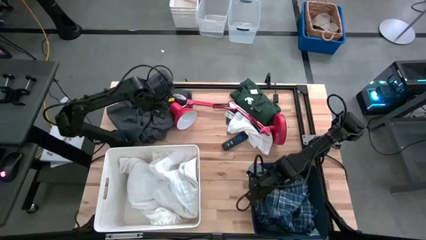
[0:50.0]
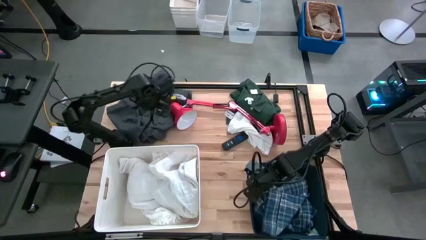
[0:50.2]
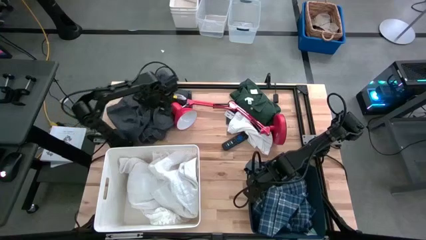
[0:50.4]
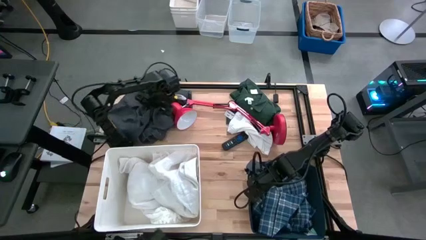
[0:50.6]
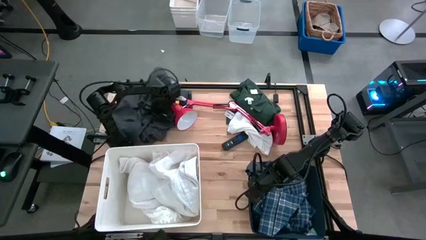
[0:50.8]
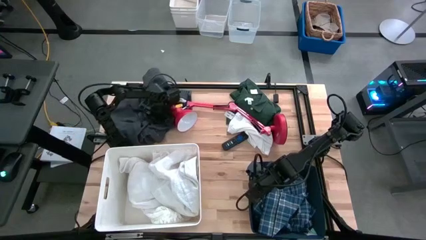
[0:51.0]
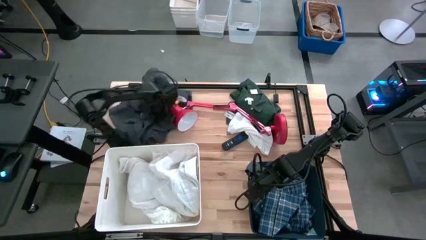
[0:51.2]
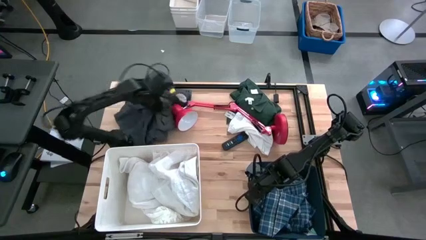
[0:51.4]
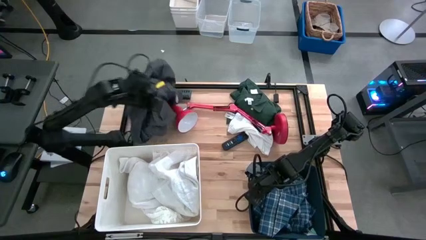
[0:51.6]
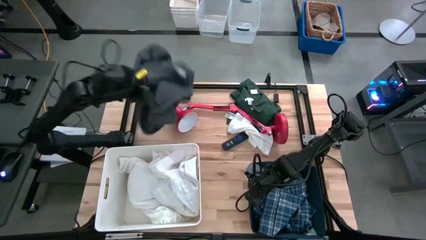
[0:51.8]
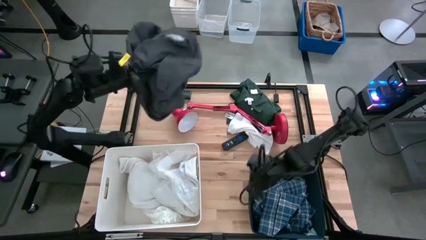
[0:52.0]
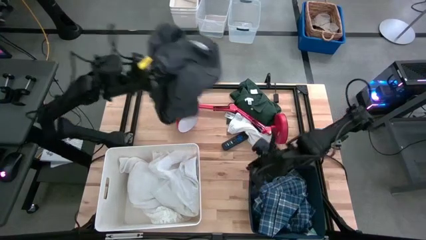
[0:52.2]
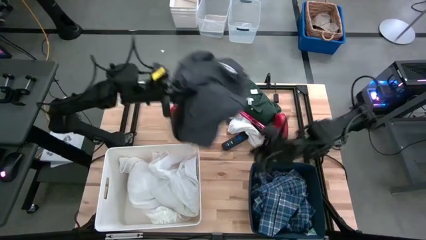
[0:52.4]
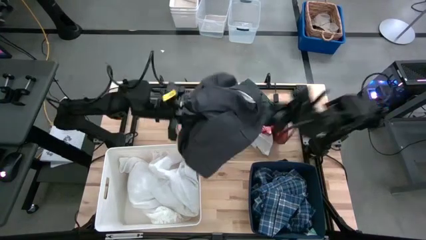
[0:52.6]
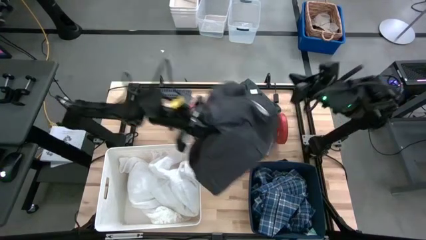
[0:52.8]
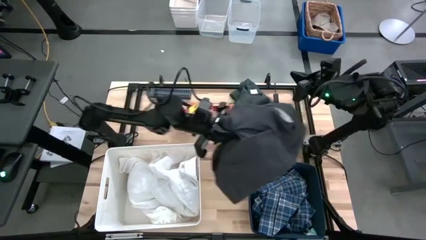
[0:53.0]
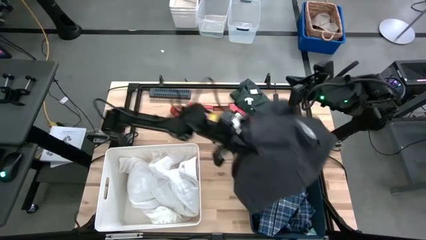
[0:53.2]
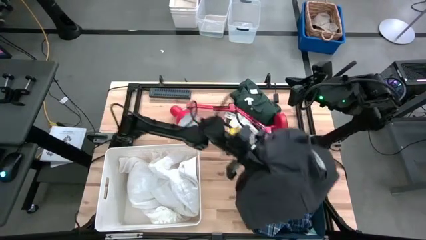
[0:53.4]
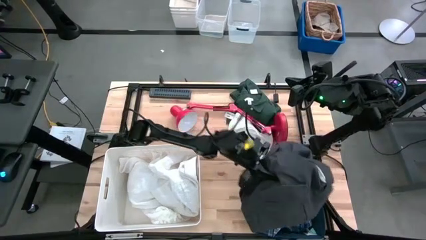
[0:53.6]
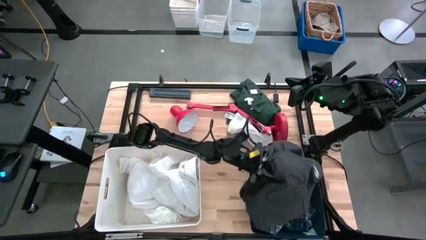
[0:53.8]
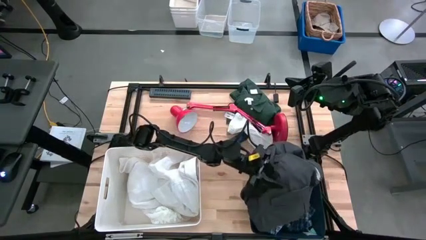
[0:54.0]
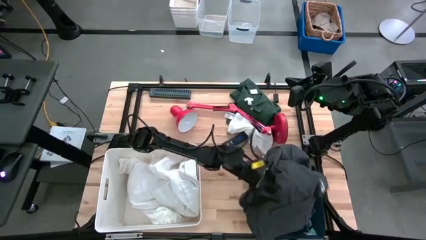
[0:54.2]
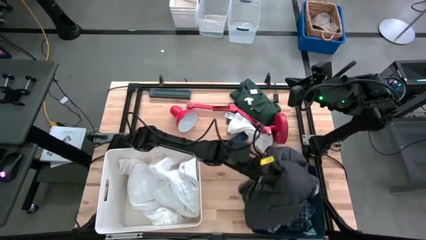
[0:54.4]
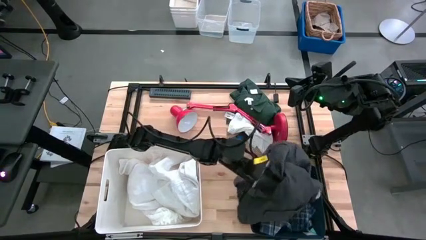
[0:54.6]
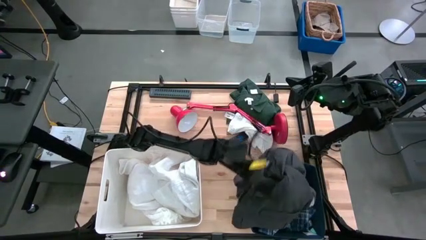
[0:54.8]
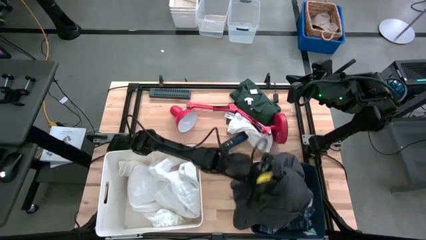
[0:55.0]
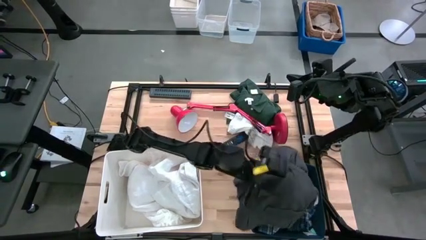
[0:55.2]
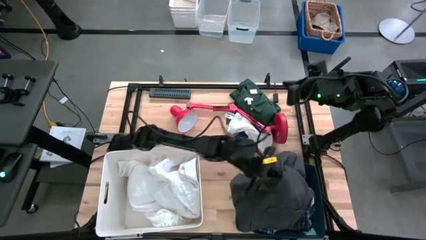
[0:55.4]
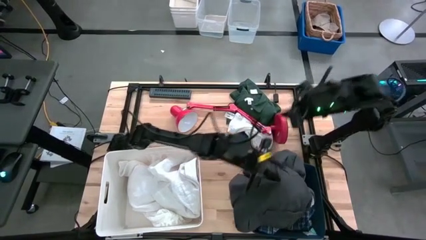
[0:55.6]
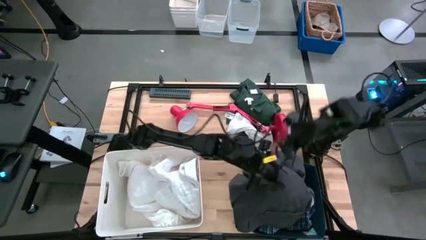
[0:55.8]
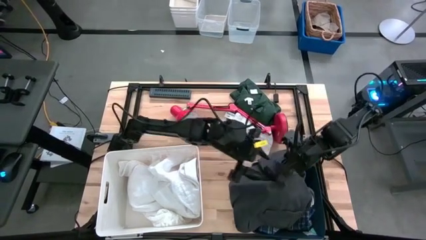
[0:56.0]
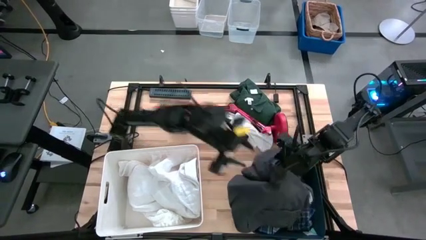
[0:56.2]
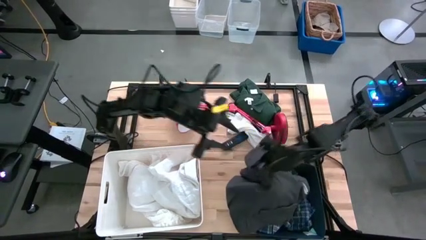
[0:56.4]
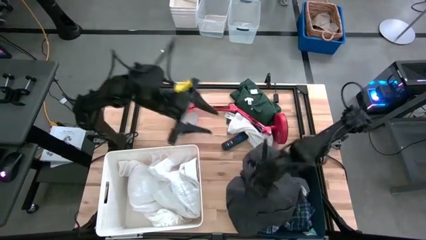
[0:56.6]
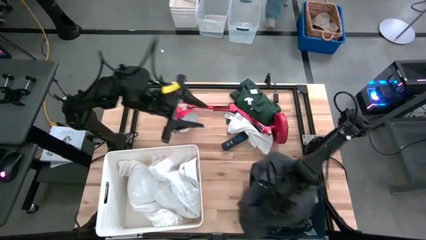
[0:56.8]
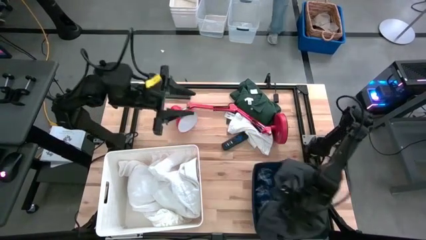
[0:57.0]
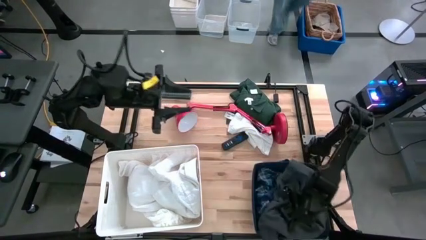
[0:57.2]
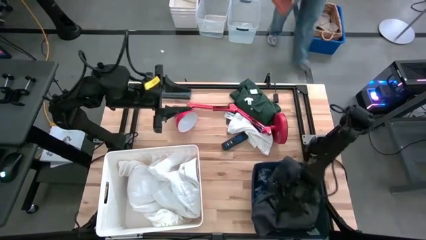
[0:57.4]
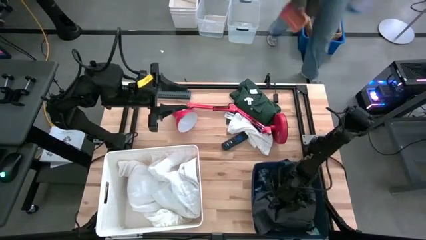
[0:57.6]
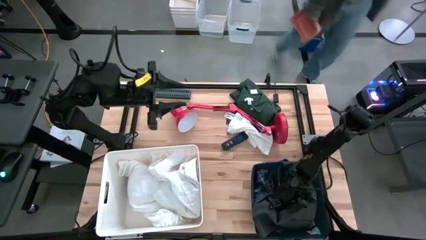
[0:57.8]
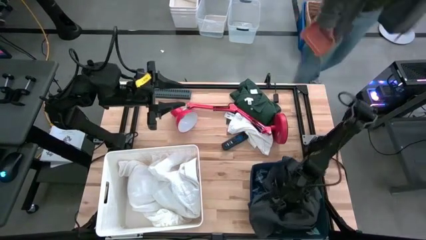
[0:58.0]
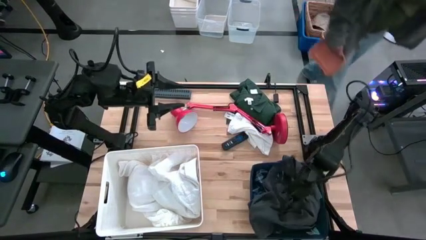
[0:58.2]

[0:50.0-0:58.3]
Task: Sort clothes
Put the black shorts into the blue bin

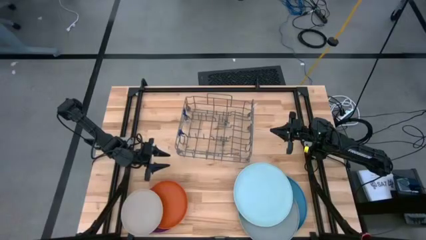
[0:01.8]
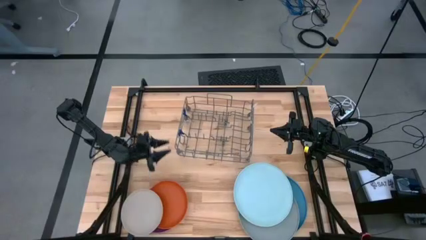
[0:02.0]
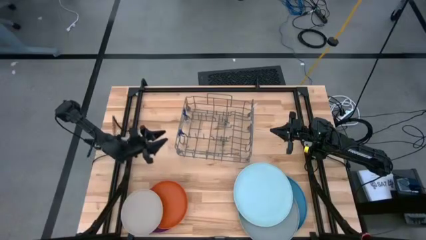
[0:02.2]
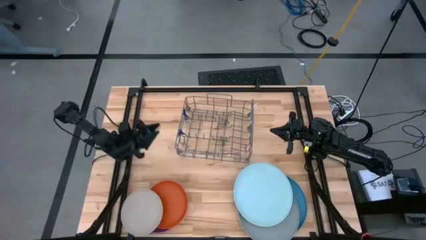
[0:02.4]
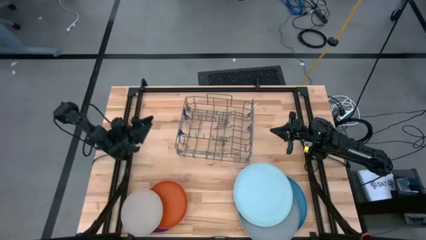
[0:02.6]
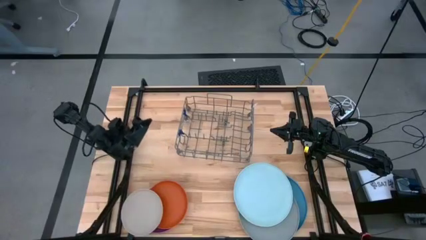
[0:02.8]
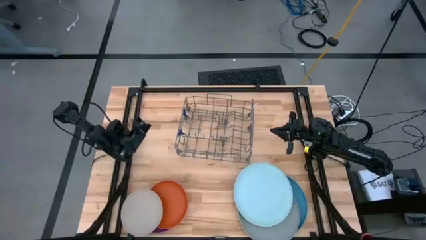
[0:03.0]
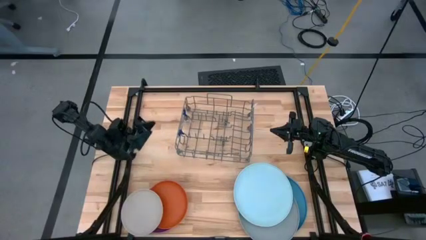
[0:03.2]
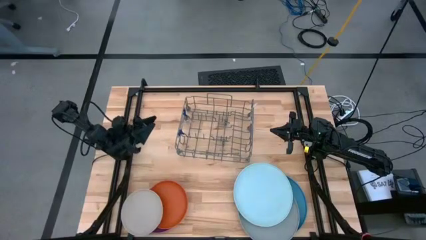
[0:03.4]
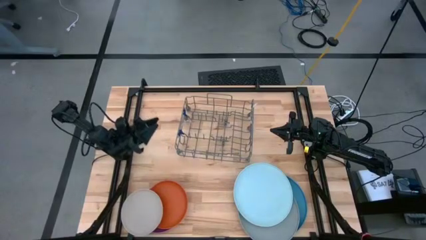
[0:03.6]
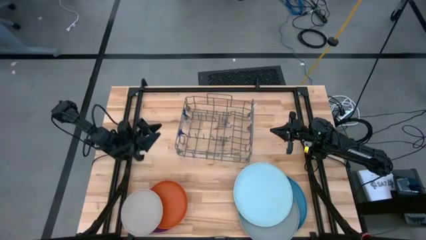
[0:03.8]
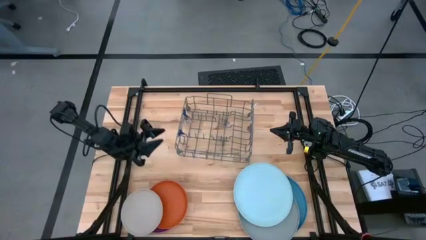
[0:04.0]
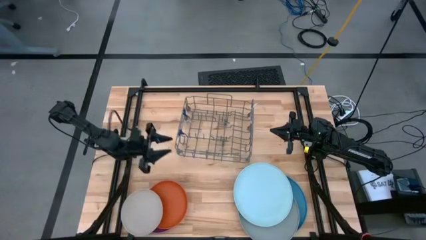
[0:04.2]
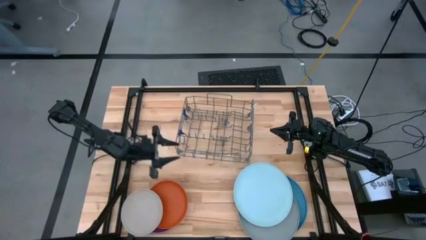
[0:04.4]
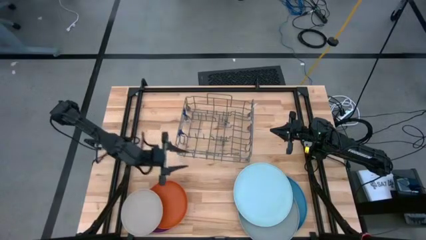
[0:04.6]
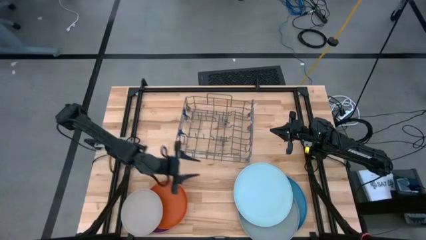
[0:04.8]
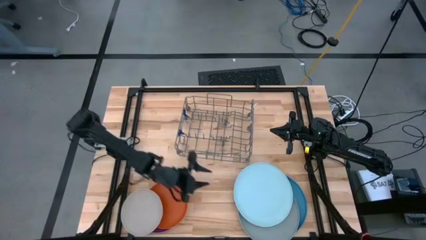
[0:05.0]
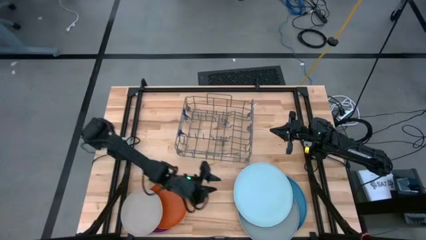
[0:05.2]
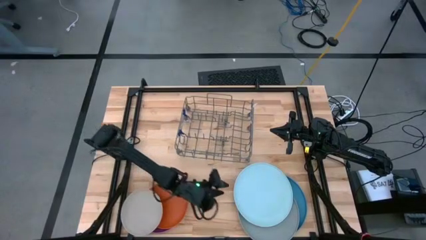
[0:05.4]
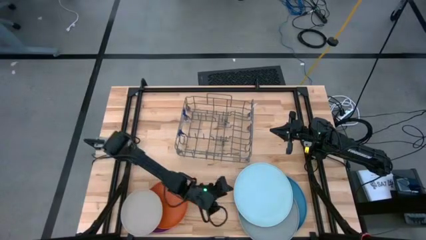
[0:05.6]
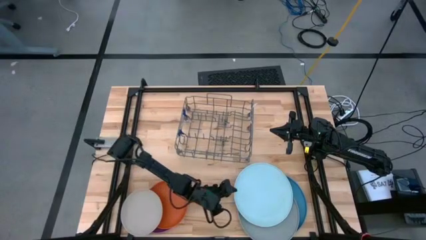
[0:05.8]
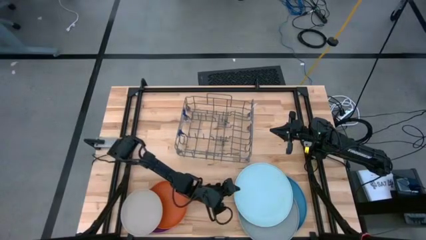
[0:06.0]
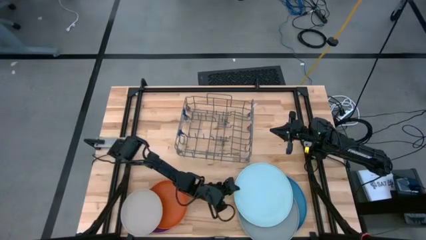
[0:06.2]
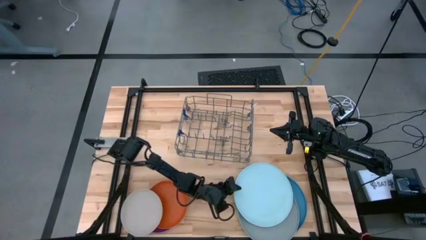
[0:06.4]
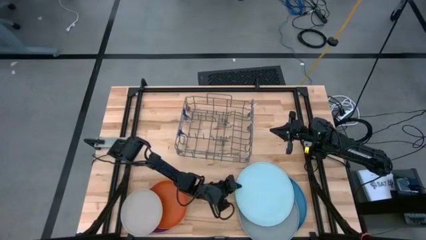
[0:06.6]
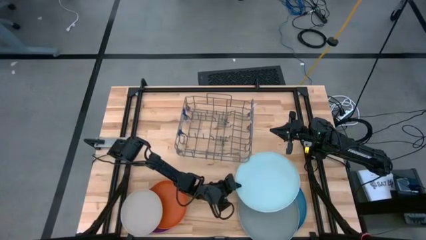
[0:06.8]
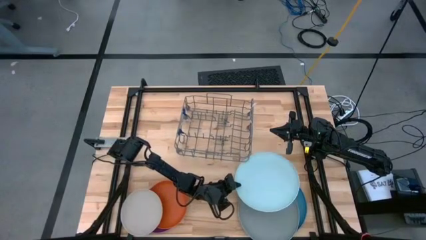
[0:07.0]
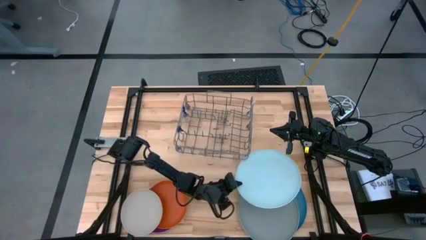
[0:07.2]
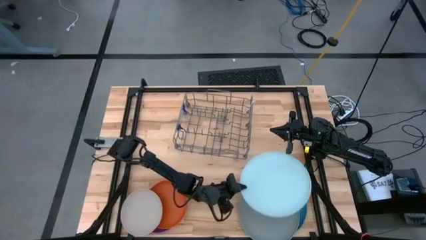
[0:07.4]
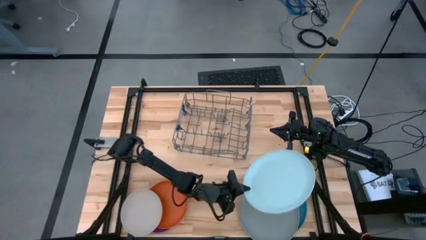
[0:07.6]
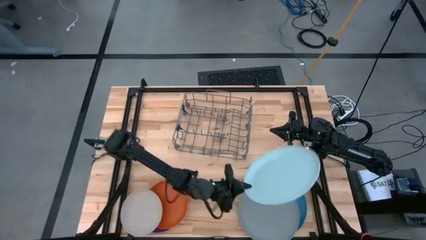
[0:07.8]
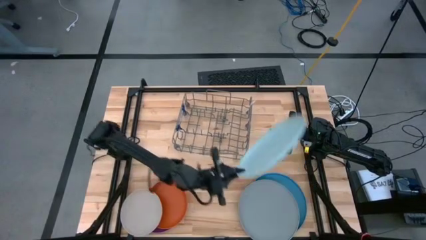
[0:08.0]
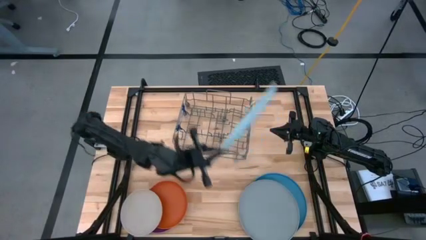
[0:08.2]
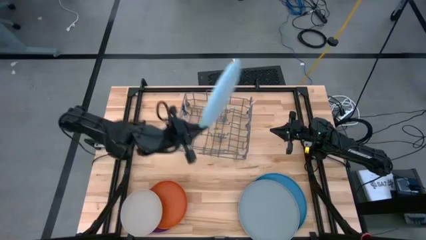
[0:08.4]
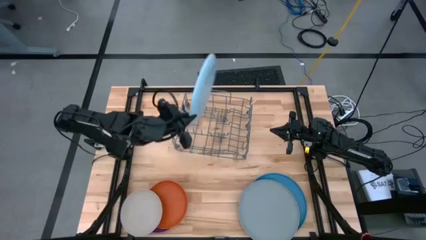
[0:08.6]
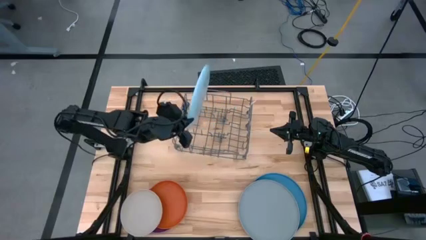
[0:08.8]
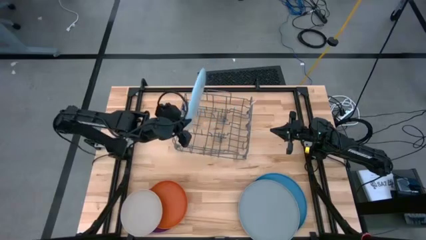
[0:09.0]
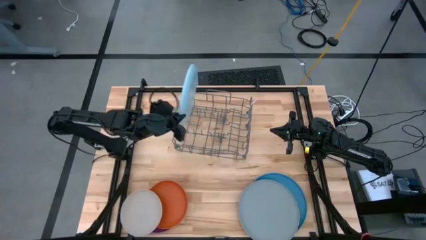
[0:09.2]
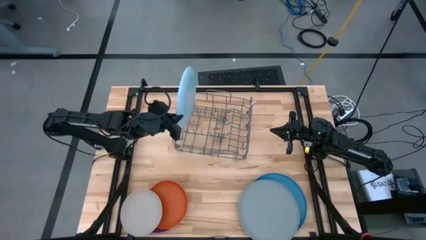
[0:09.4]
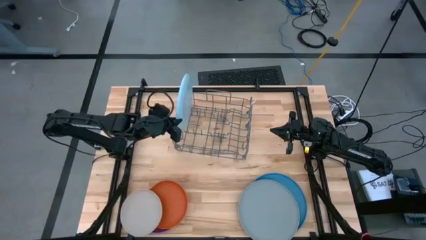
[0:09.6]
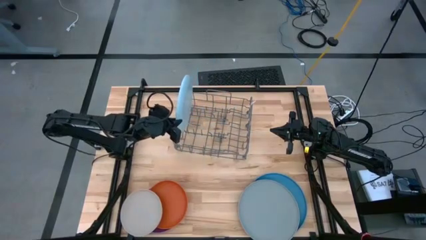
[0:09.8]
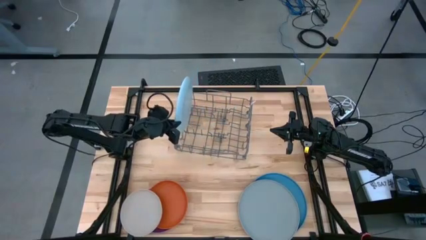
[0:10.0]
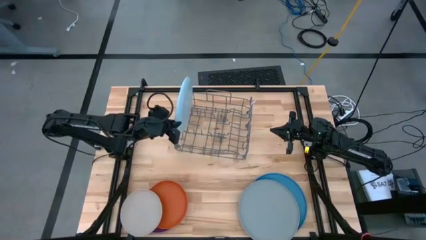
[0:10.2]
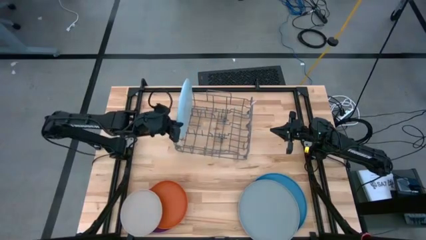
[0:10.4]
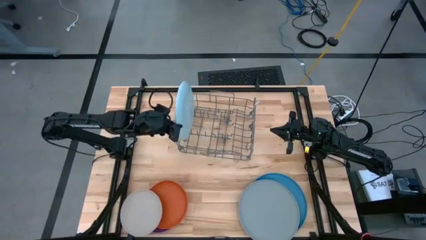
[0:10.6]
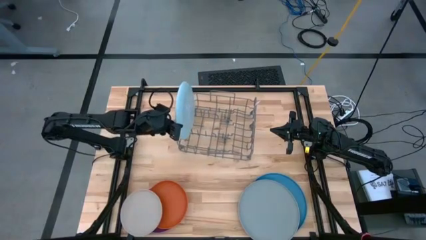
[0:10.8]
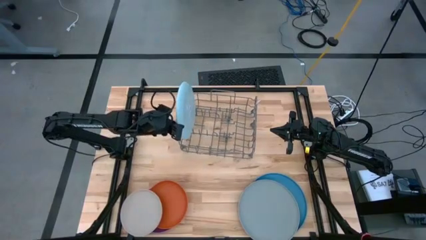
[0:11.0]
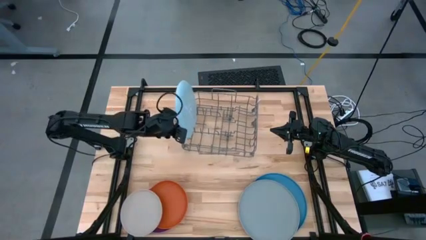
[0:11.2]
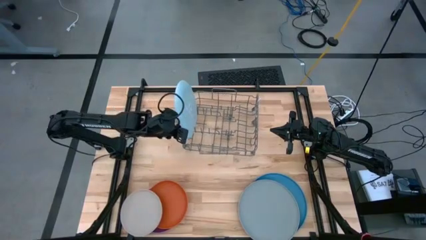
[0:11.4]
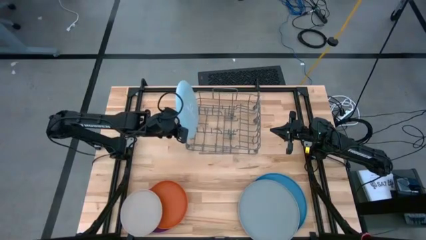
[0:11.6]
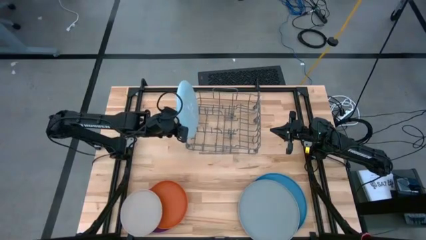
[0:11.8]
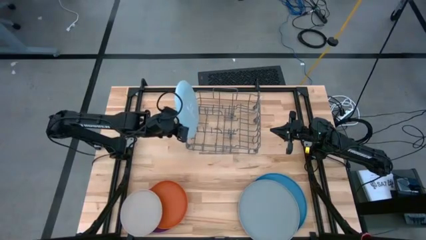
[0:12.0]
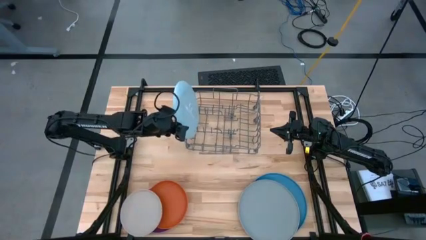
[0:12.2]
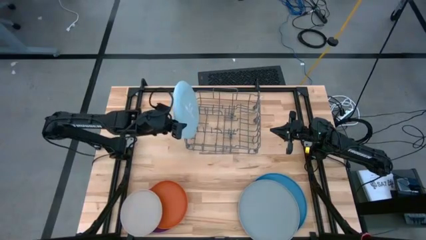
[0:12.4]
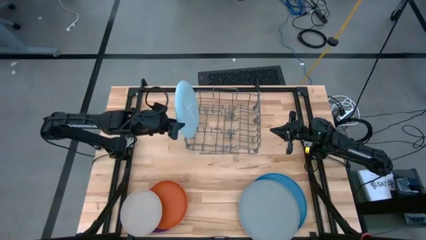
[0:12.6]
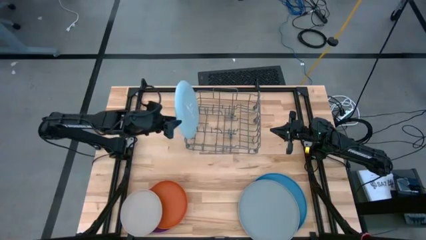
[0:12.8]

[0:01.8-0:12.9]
Task: Sort dishes
Put the light blue plate into the dish rack
